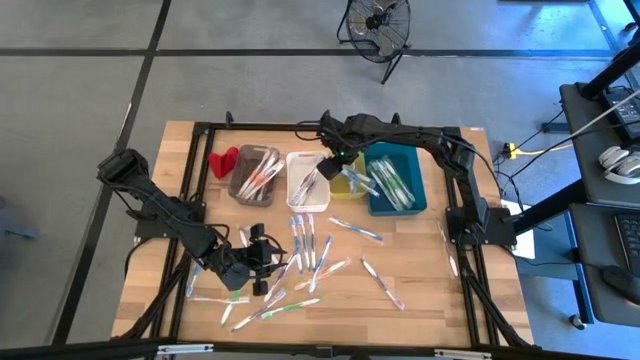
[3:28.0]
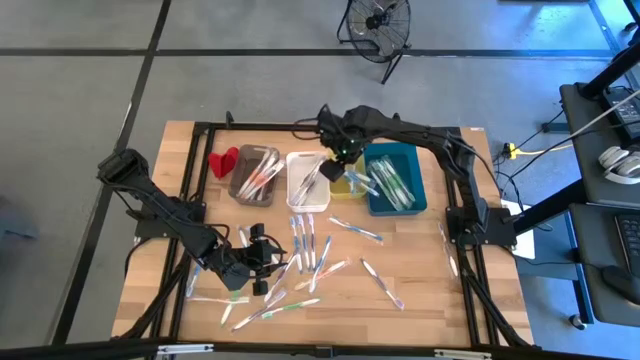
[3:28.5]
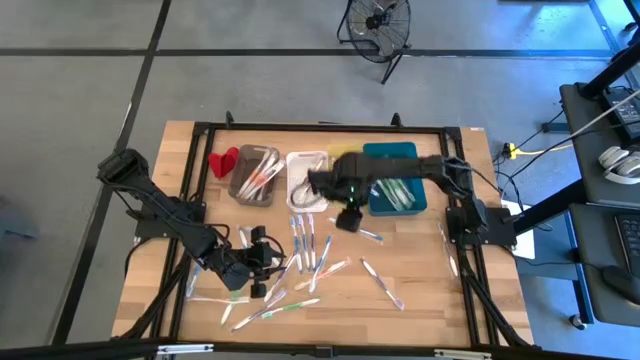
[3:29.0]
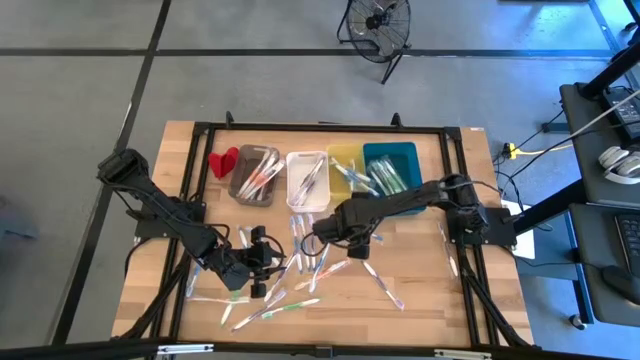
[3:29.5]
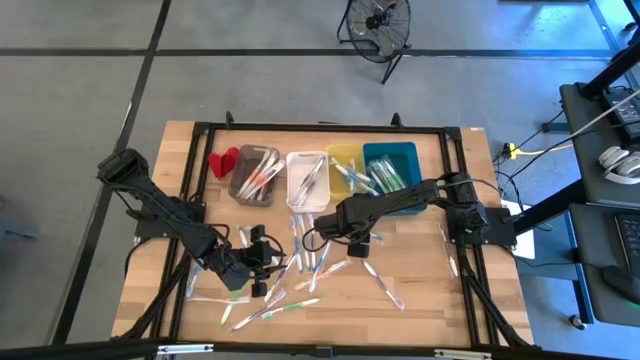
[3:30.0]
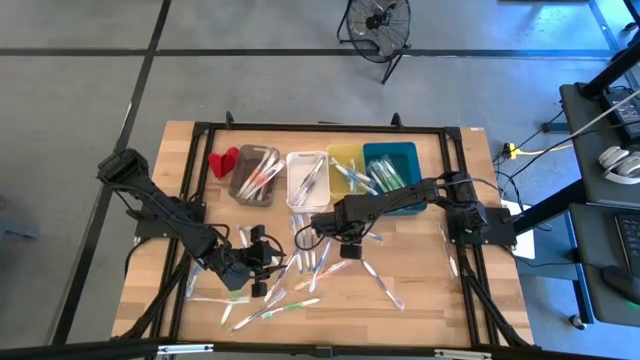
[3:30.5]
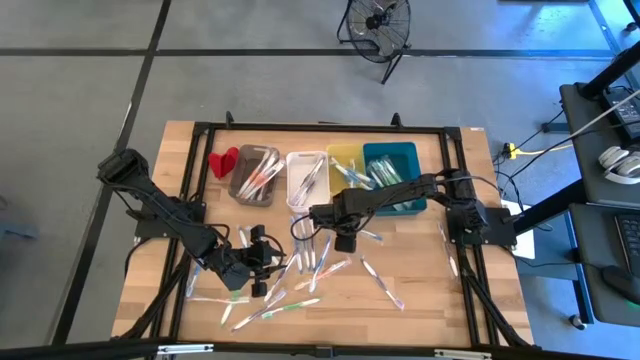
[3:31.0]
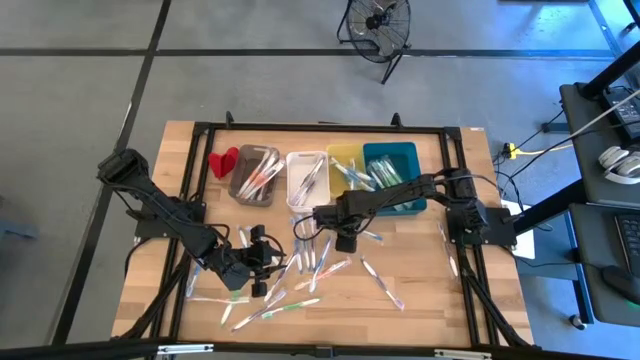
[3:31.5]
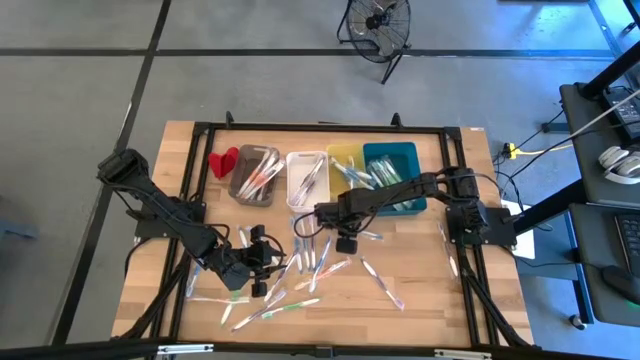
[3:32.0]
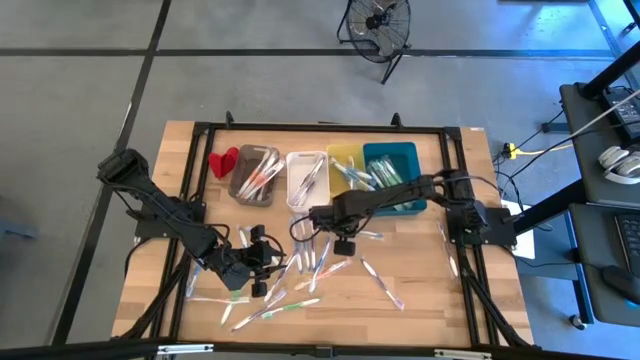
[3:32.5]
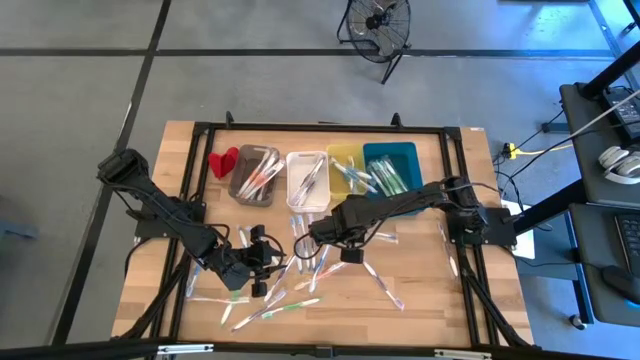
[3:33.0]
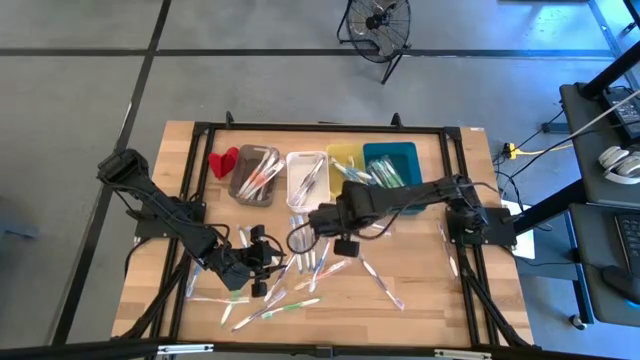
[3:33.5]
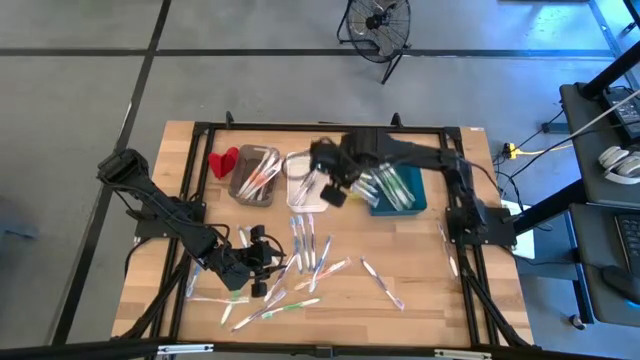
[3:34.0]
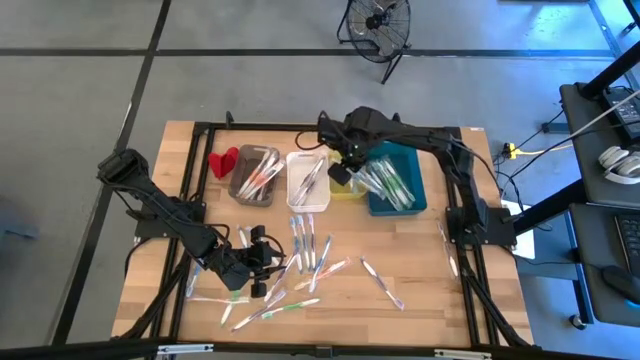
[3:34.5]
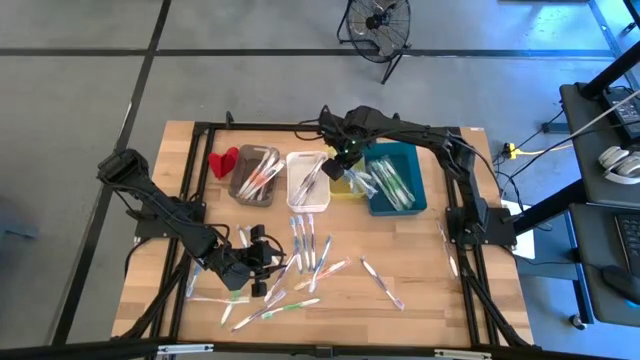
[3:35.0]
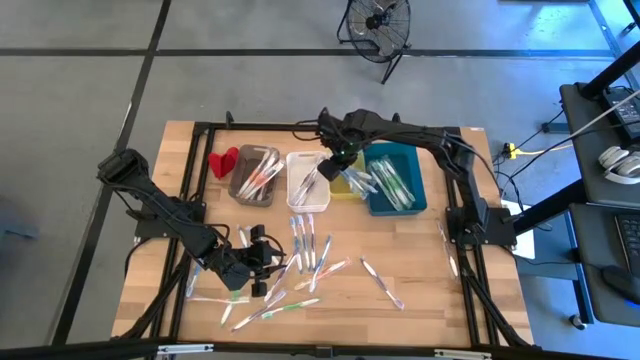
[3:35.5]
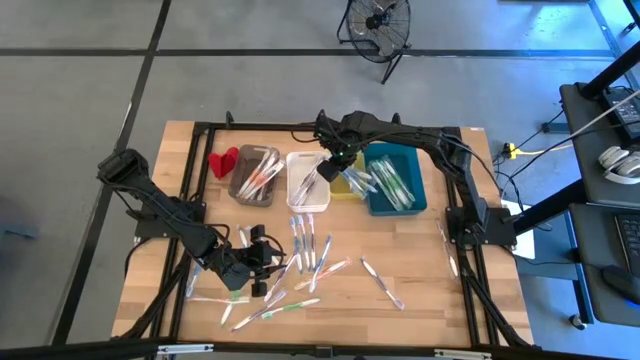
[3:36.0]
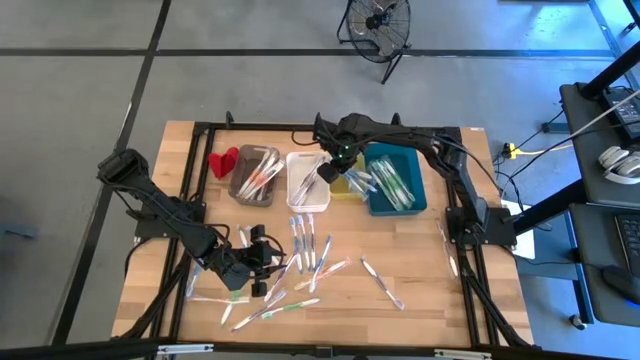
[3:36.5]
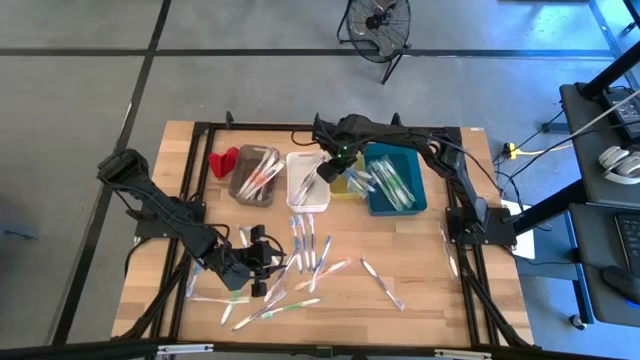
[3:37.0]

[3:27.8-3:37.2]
Task: Pick & Place Toothbrushes
Put the blue toothbrush into the yellow bin

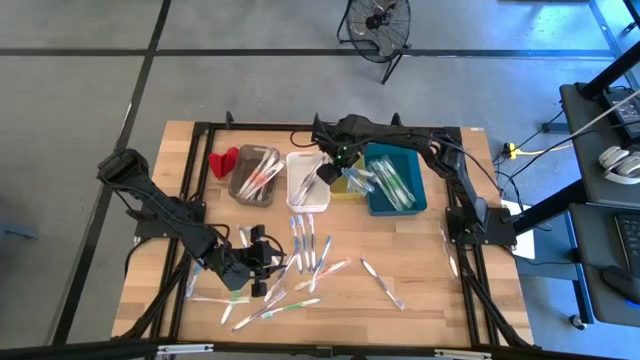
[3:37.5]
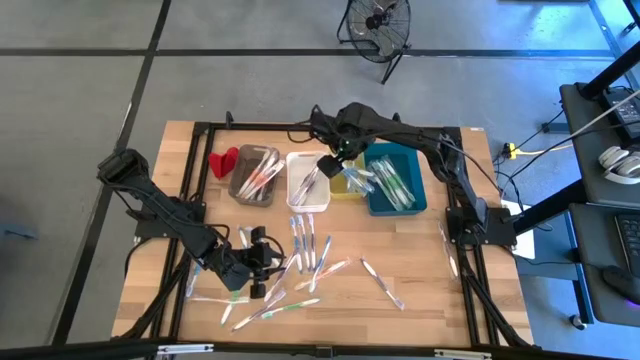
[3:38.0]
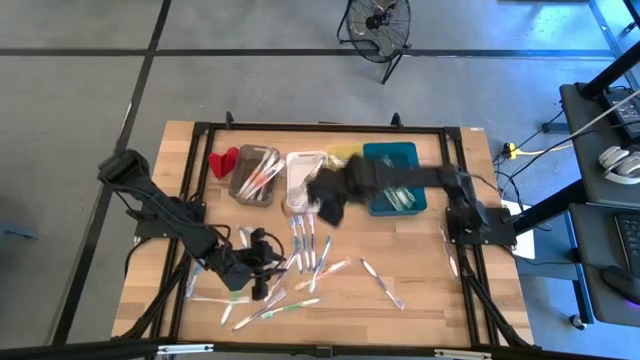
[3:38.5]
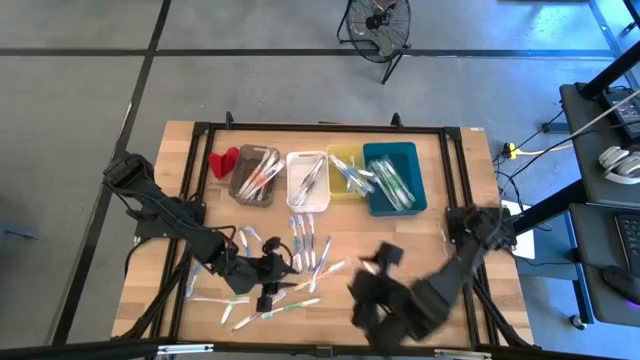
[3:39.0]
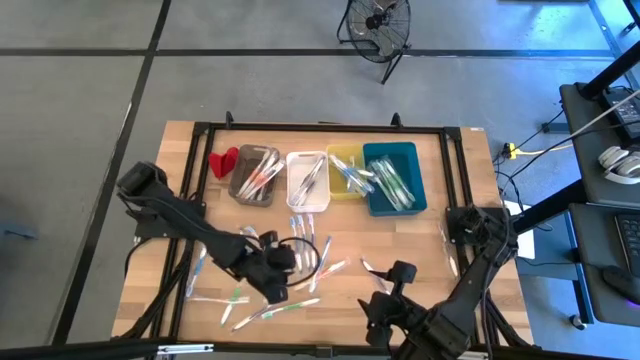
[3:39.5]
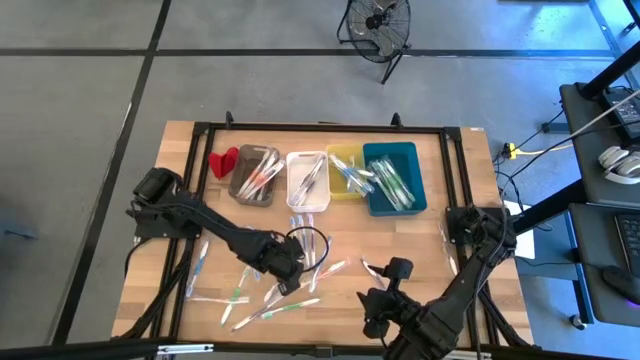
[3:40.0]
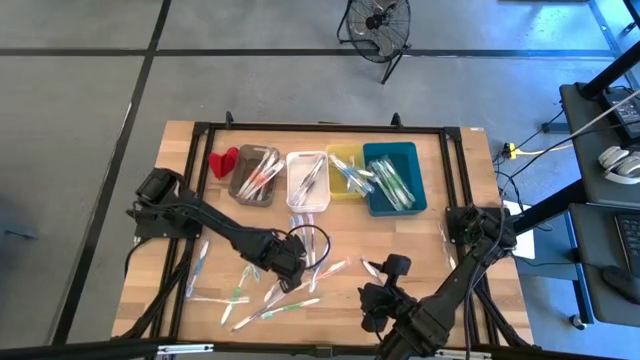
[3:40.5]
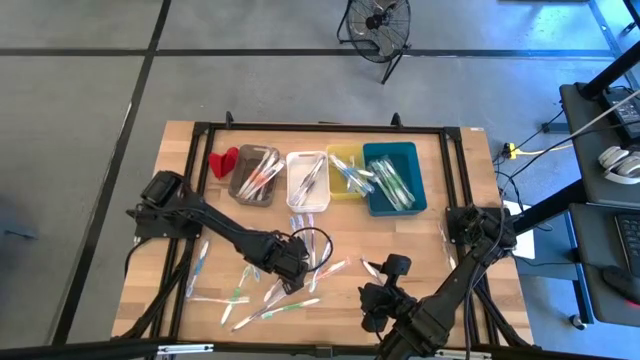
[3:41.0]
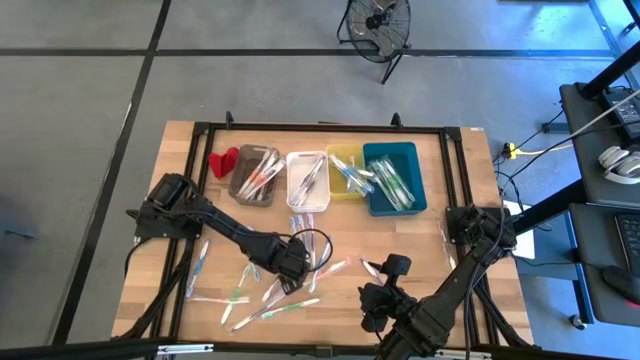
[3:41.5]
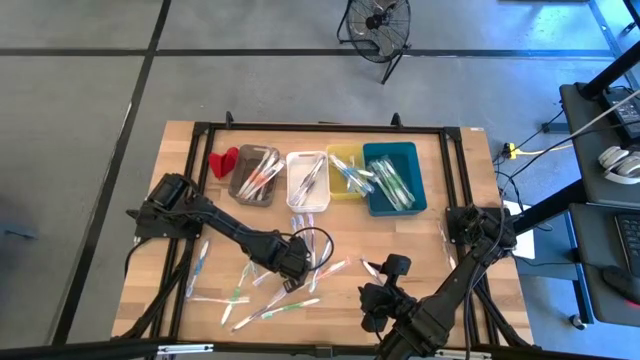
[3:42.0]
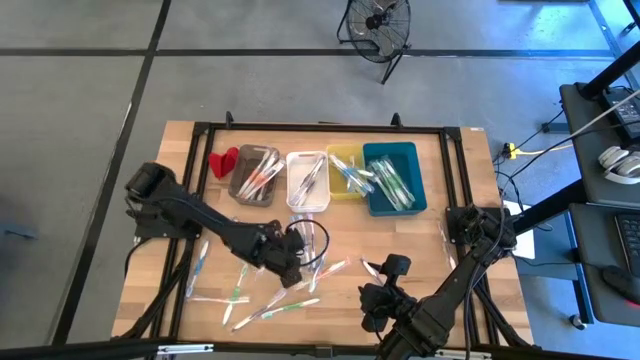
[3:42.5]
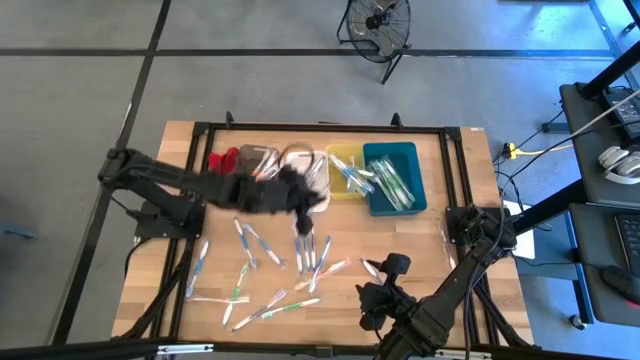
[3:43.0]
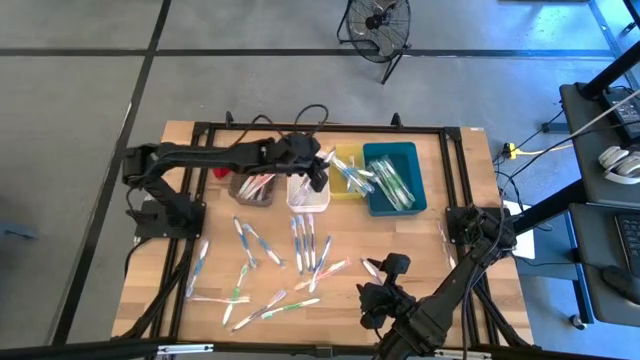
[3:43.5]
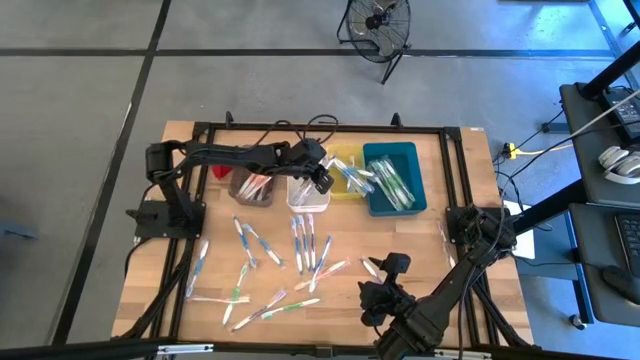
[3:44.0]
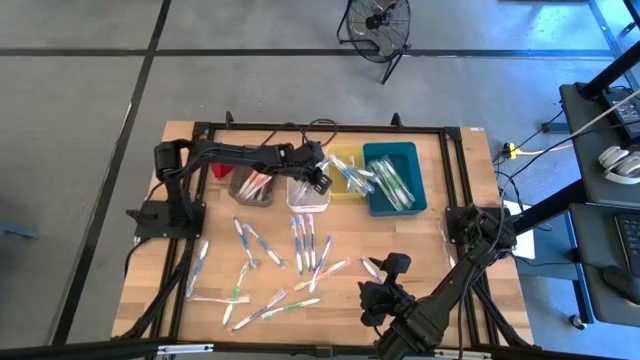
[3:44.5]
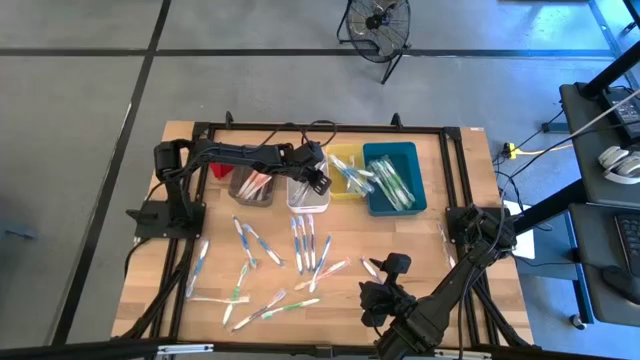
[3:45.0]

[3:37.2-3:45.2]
Put the purple toothbrush into the white bin

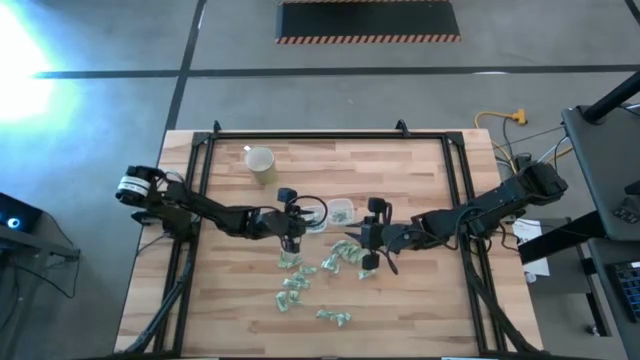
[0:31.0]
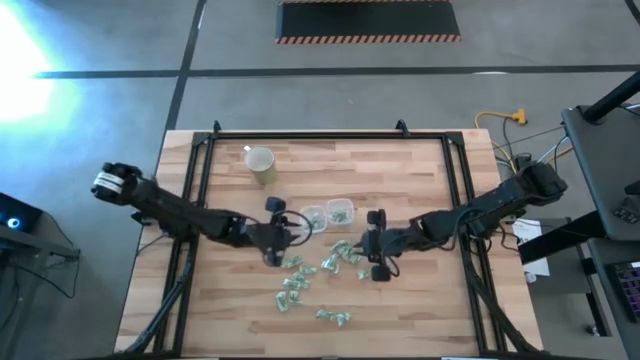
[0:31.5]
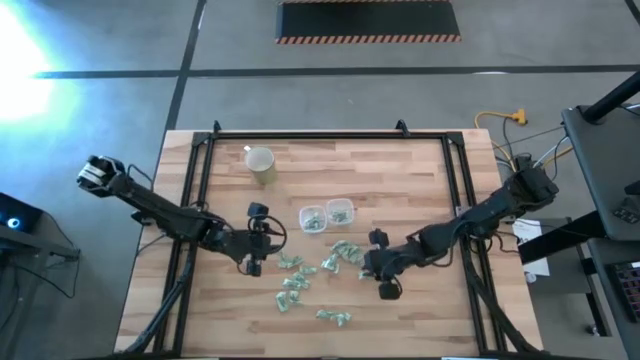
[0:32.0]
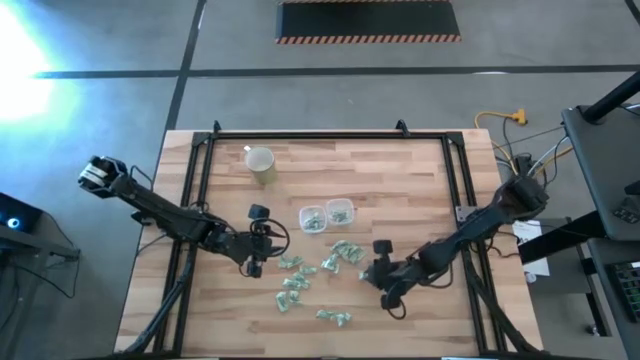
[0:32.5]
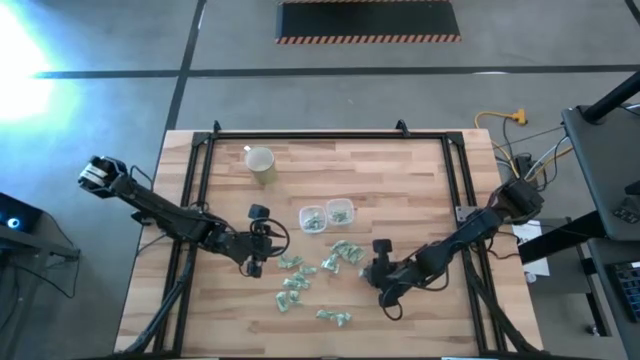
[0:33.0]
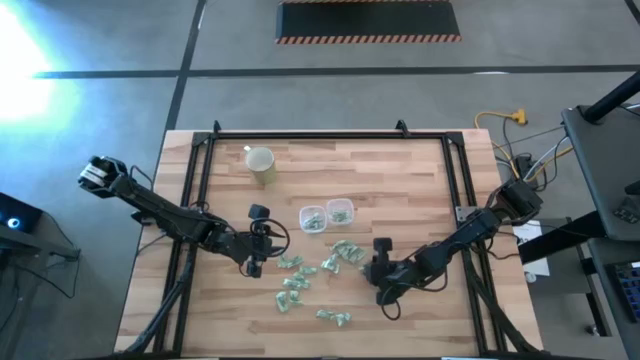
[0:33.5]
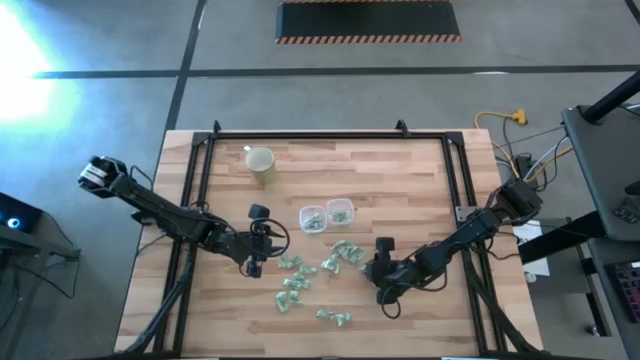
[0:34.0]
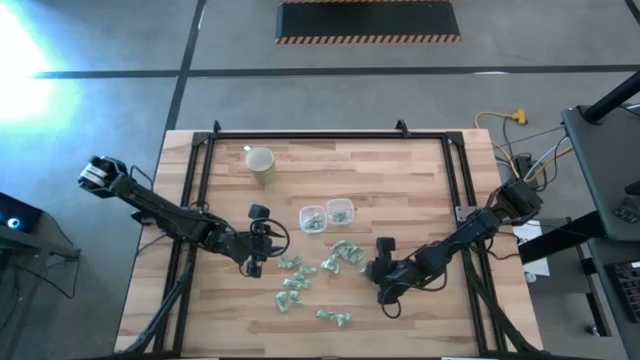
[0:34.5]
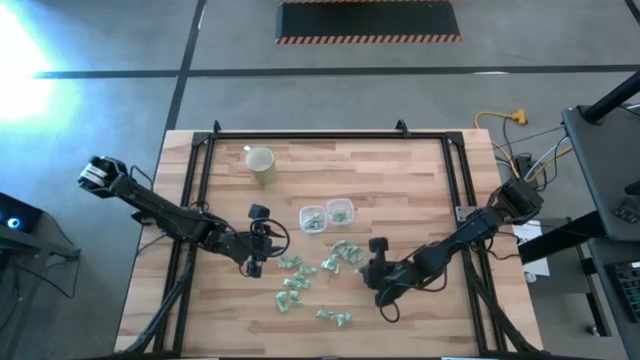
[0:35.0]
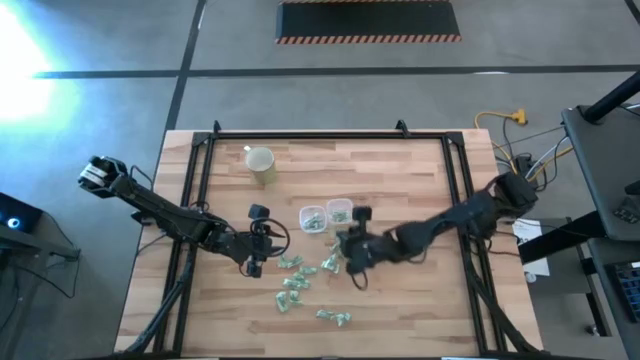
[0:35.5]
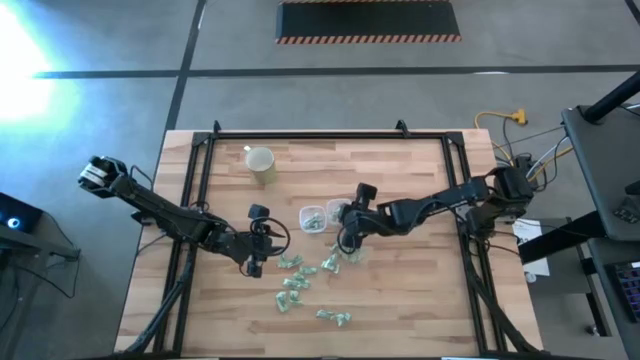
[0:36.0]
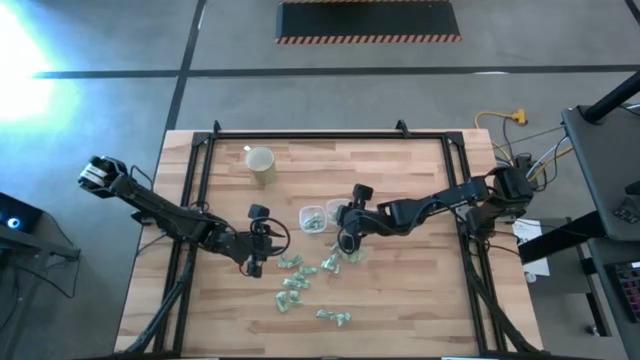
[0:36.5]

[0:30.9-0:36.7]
Task: Pick and place items into bin
Put the stevia packet into the right transparent bin
